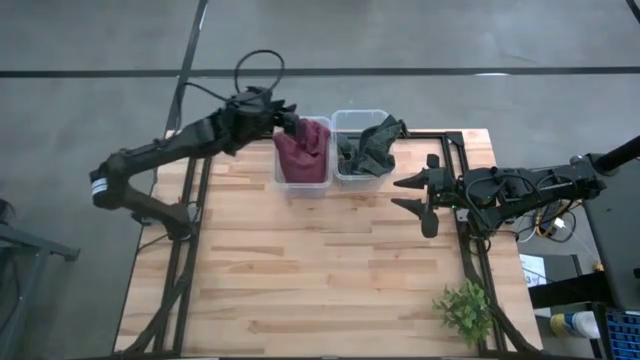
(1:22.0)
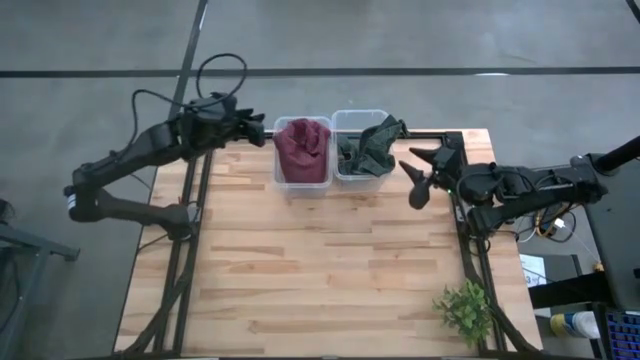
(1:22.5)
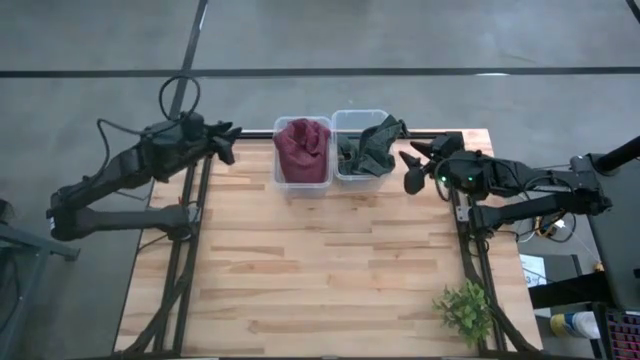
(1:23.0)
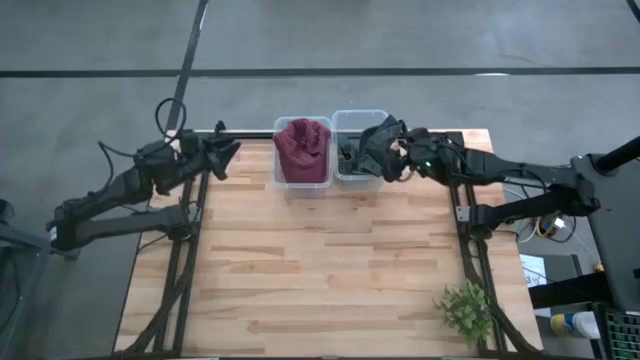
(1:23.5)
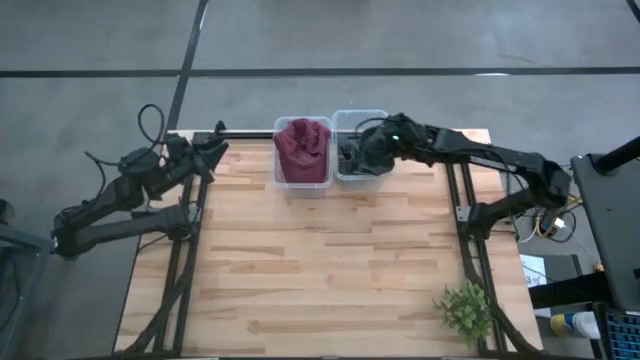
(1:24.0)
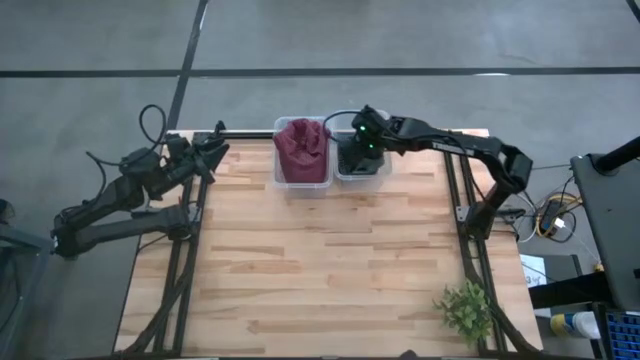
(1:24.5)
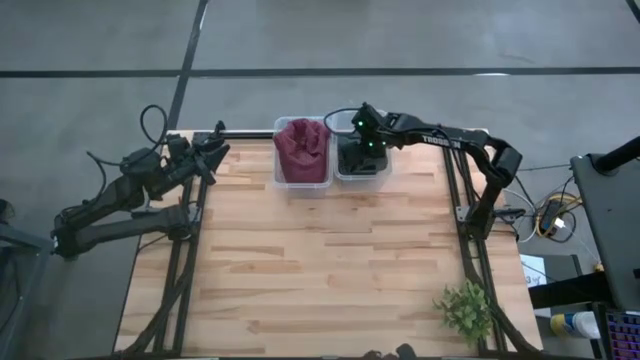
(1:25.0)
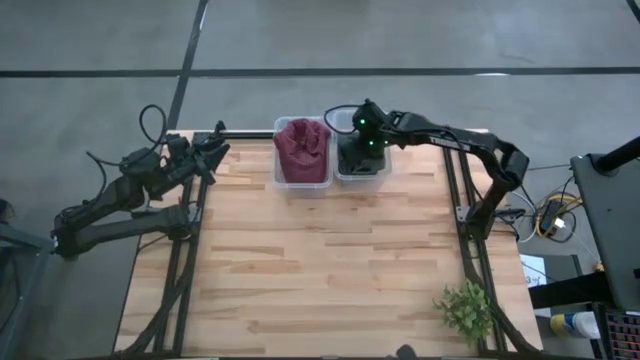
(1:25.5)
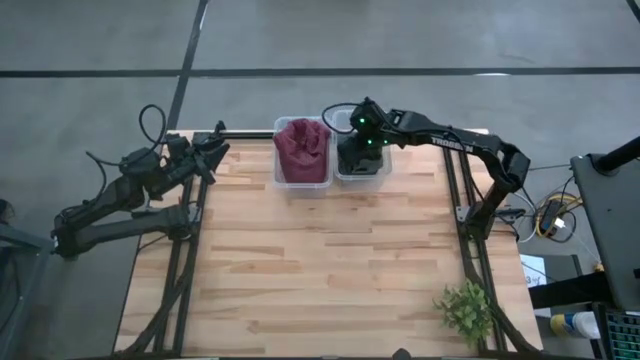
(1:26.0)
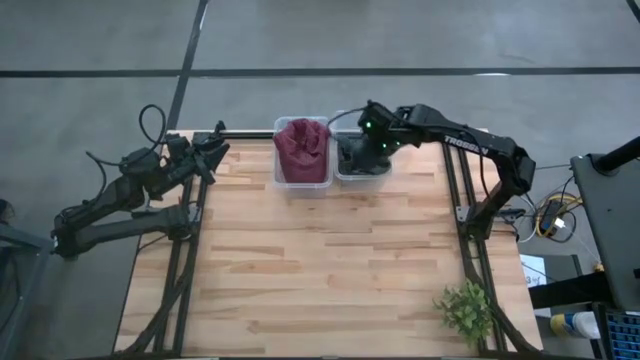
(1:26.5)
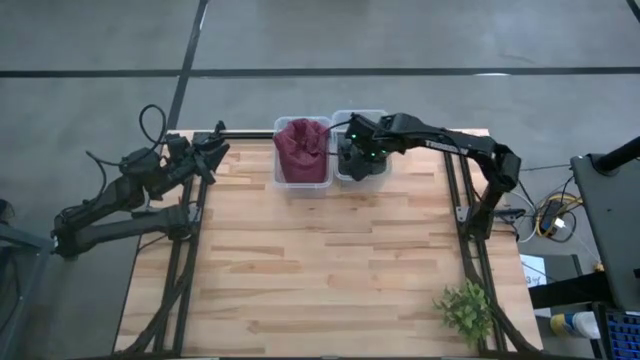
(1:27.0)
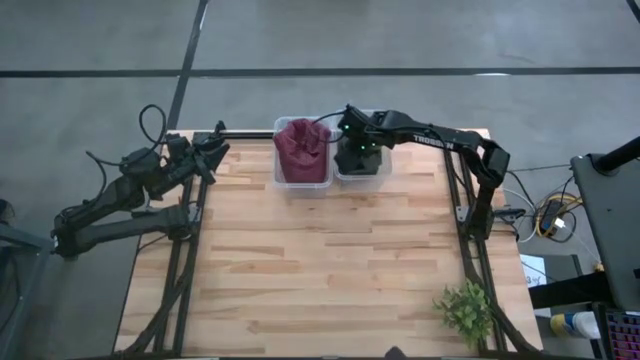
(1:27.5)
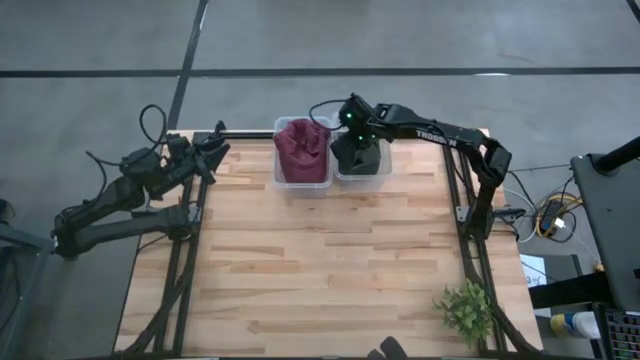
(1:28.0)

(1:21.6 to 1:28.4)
Task: Pick & Place hat
Adjust the black cap in the right transparent bin

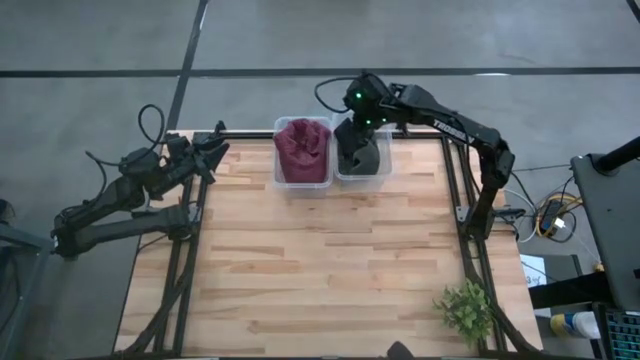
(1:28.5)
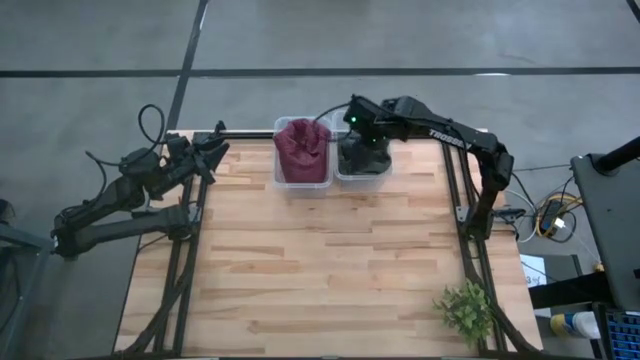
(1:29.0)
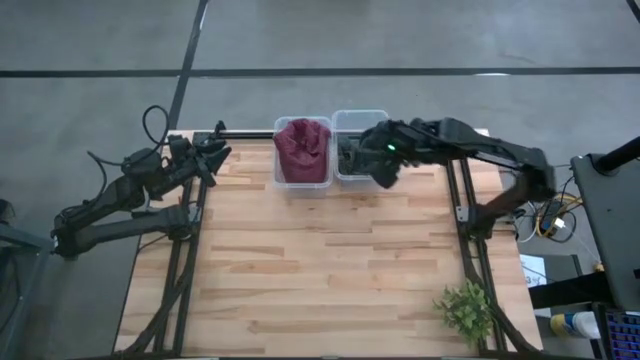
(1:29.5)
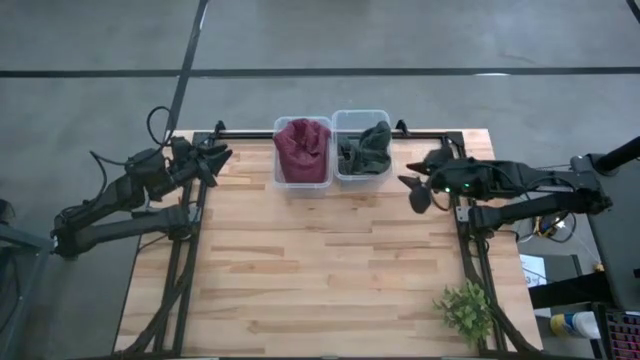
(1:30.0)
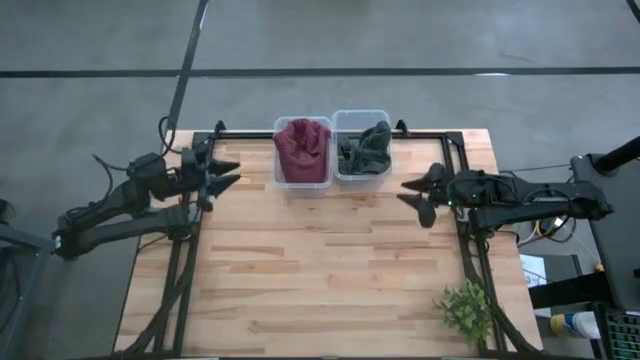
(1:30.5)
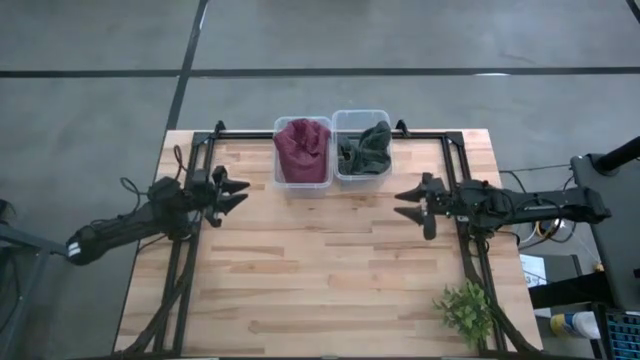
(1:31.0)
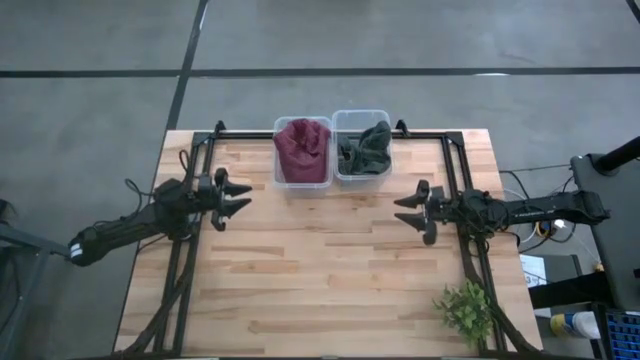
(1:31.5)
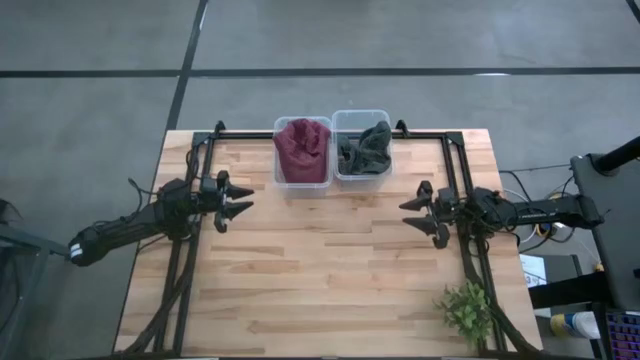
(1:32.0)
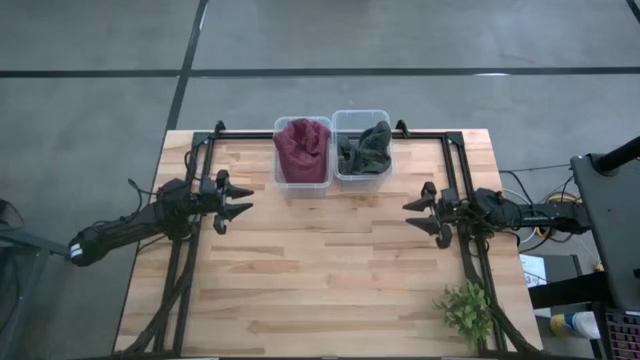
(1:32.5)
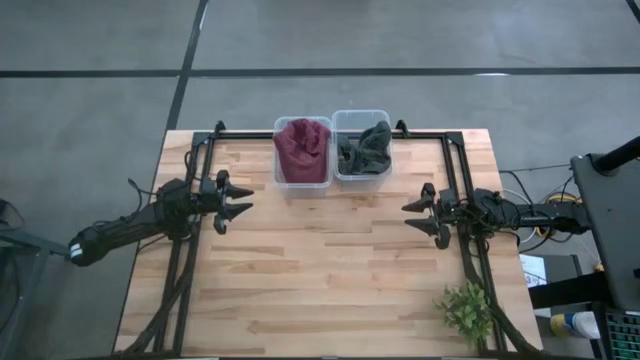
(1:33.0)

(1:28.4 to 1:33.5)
Return to Home Position

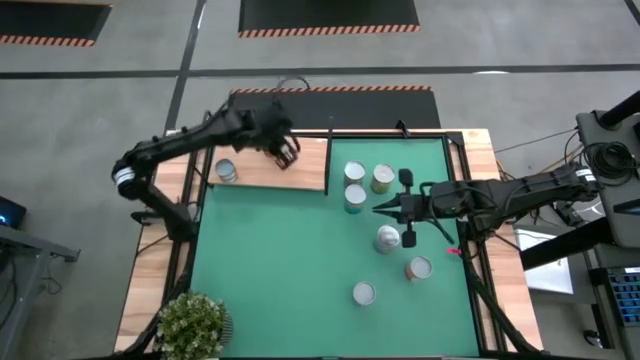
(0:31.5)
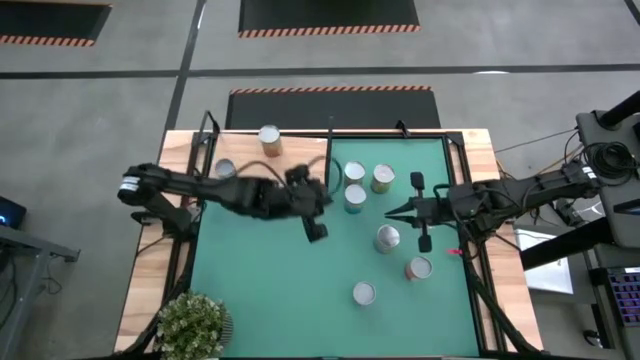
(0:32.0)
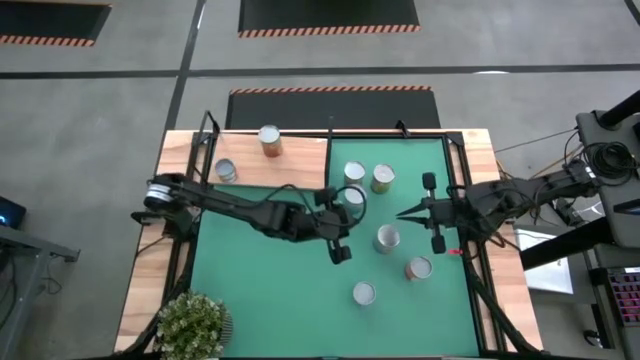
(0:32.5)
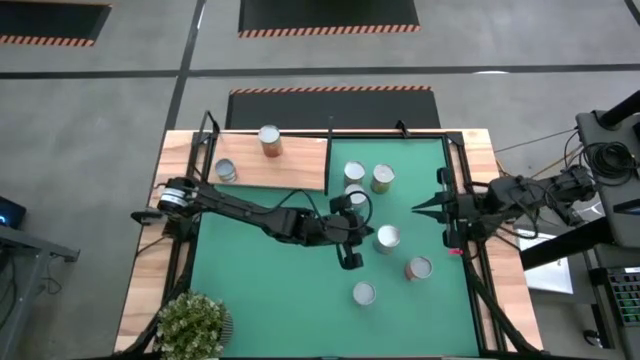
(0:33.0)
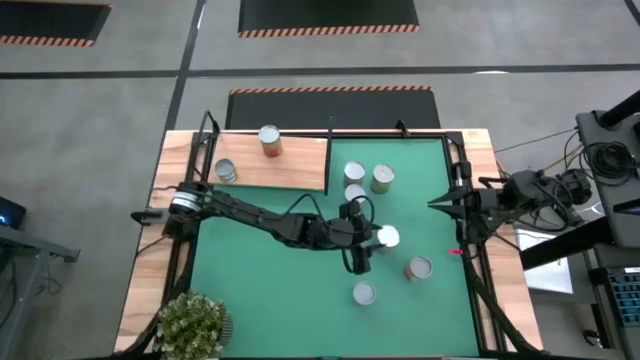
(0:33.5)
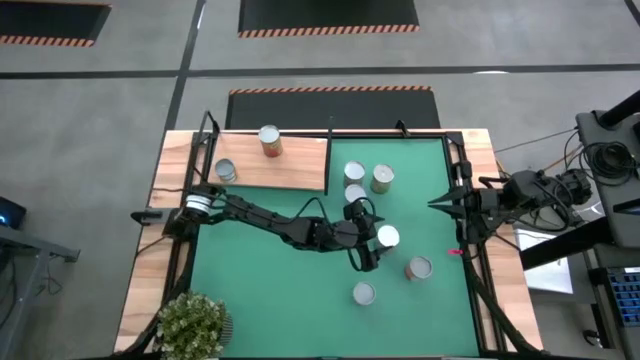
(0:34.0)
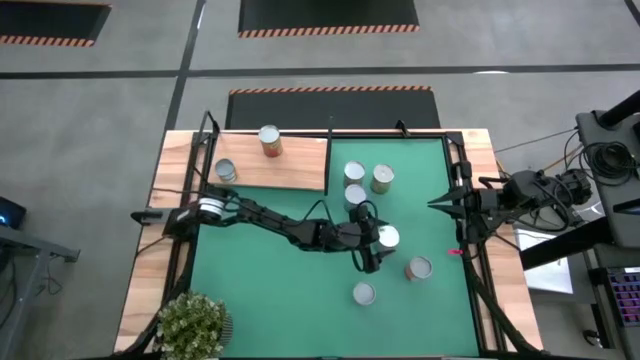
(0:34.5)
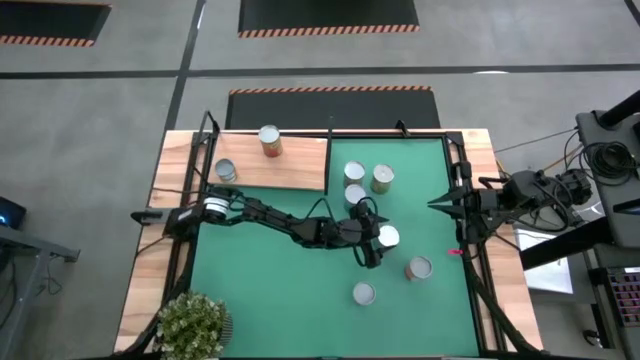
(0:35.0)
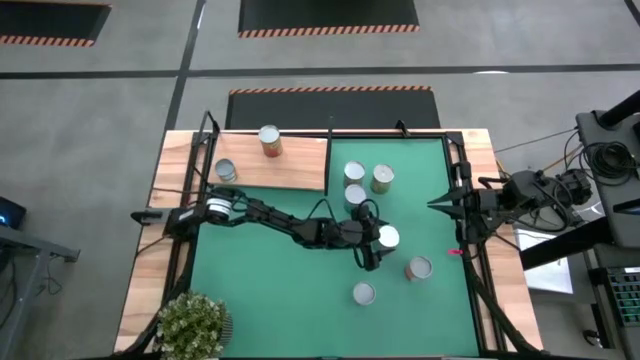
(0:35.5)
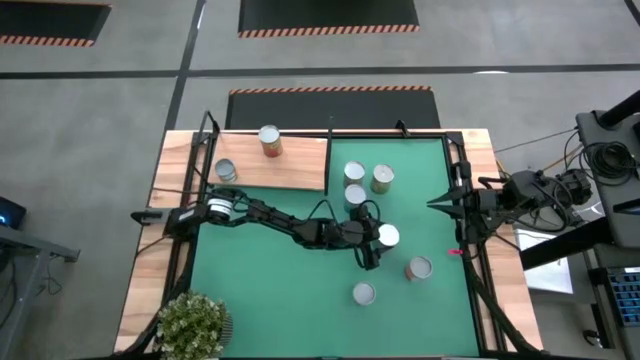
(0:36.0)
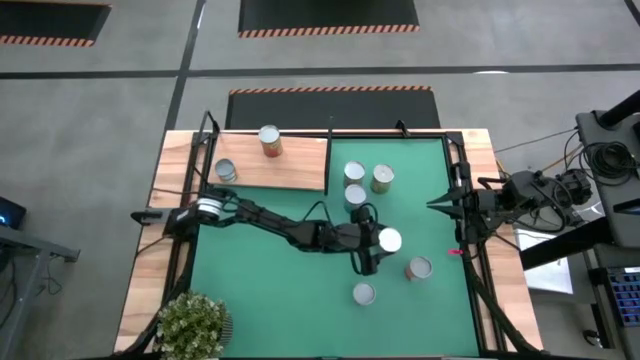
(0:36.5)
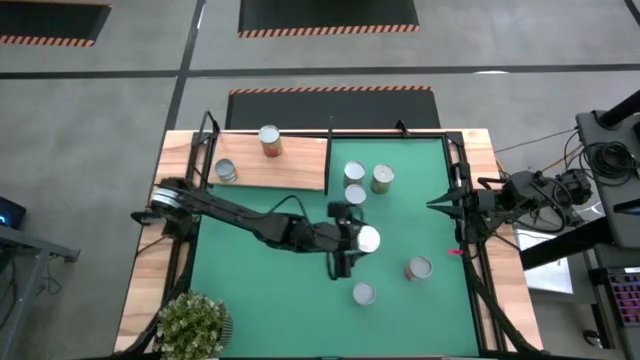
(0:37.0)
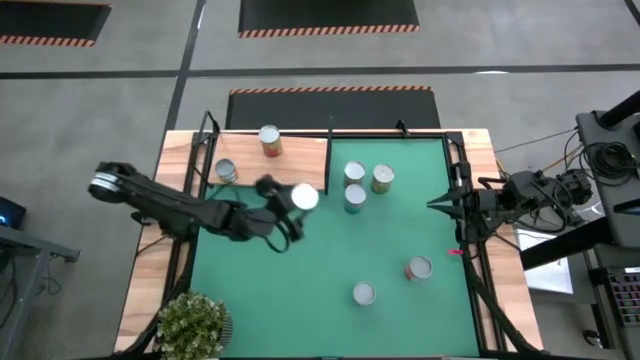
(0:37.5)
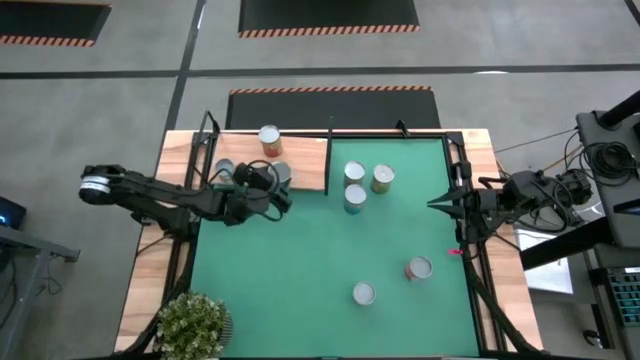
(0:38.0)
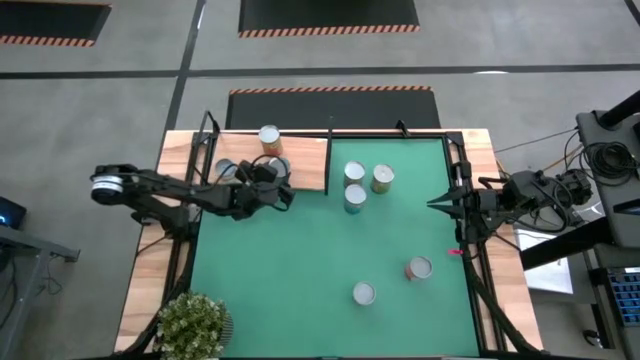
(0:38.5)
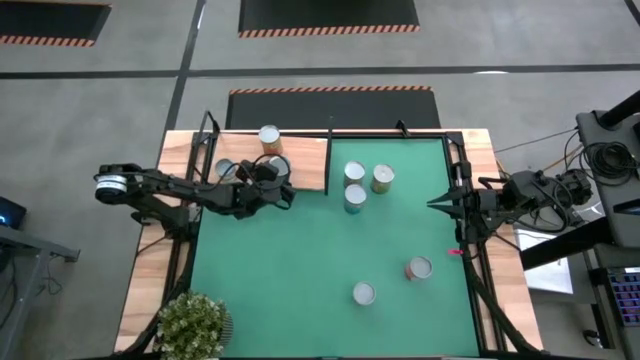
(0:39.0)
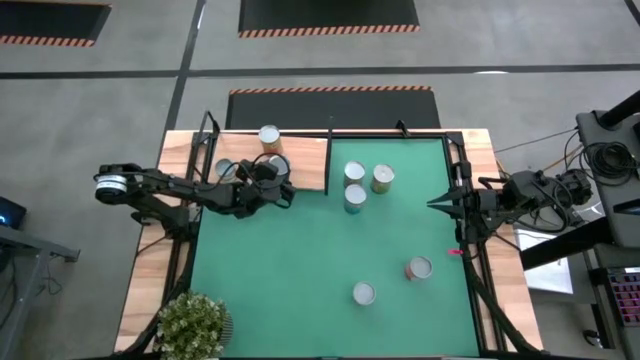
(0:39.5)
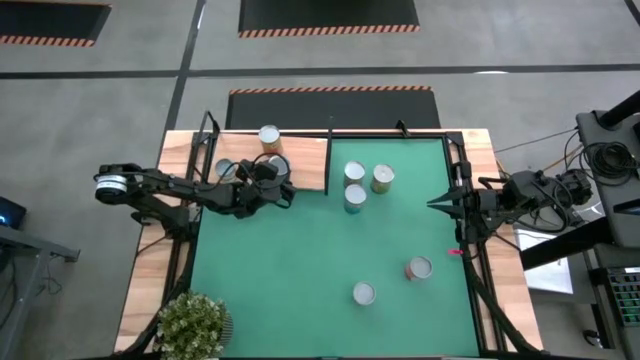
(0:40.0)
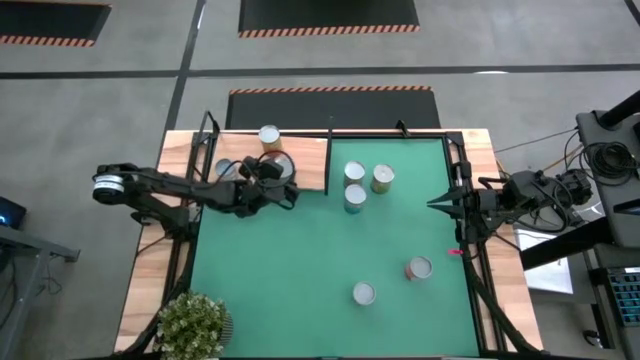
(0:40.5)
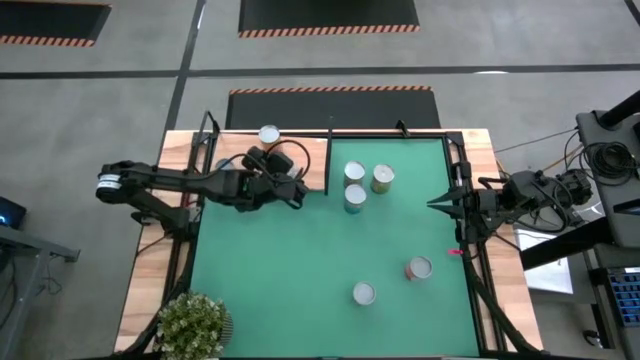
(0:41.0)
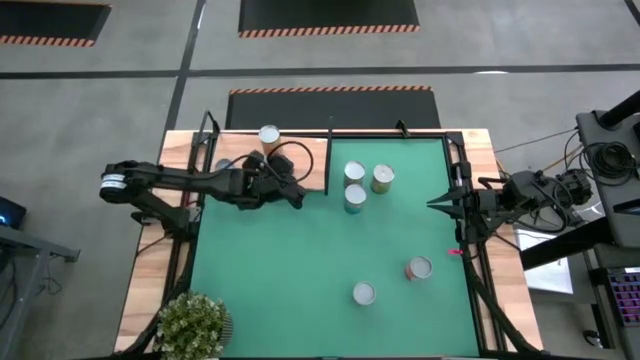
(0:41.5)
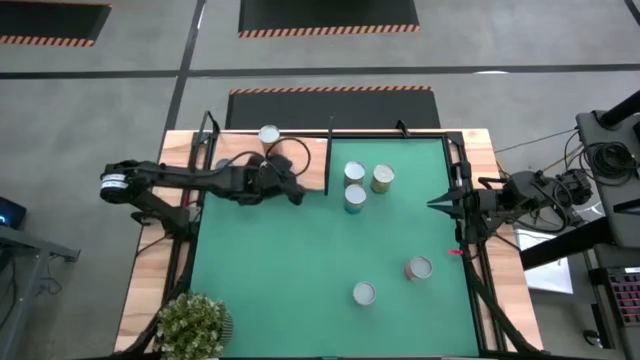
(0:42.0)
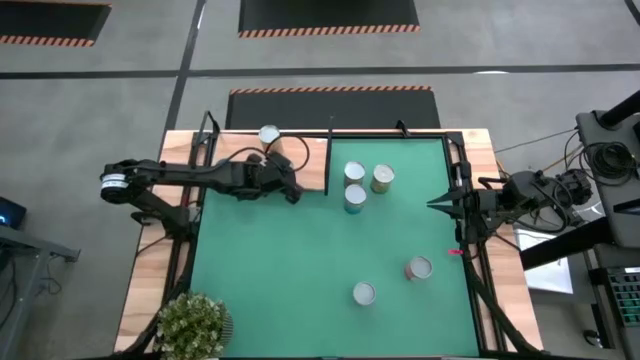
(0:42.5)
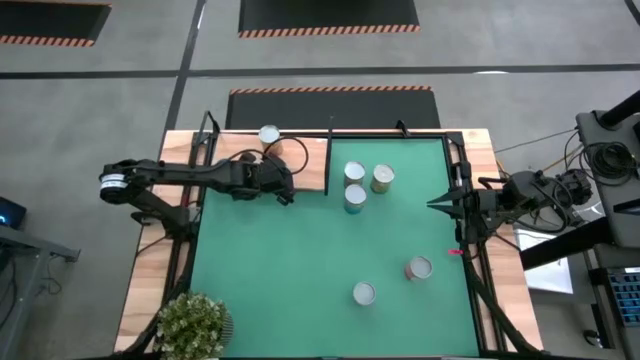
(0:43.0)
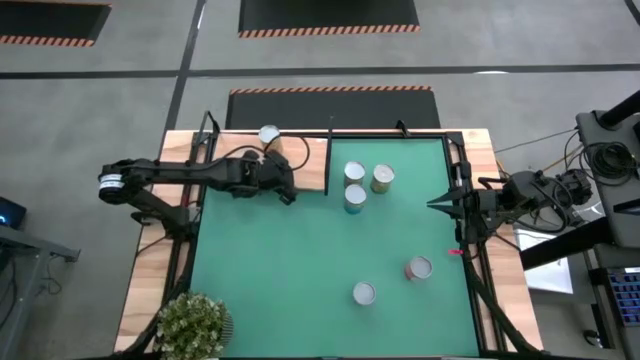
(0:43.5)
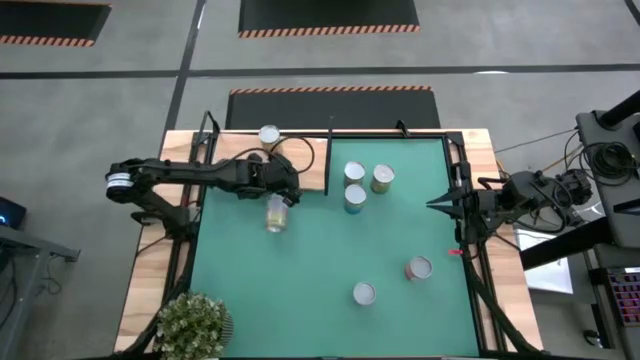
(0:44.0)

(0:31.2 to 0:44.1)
Task: Pick and place cans onto a shelf
Put the canned peaches on the shelf
